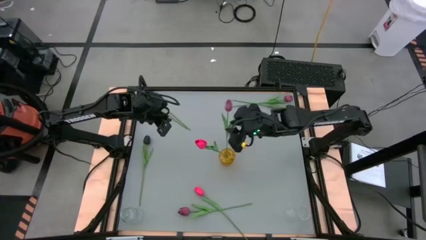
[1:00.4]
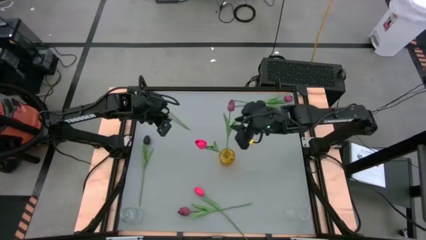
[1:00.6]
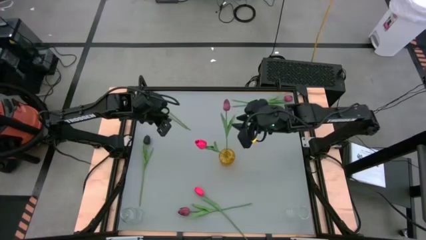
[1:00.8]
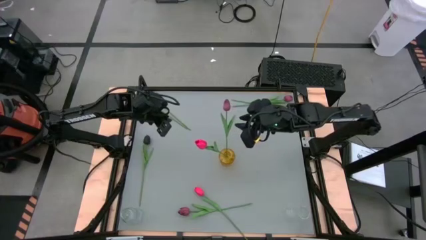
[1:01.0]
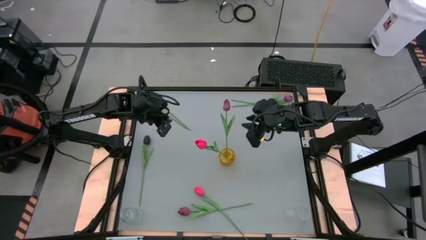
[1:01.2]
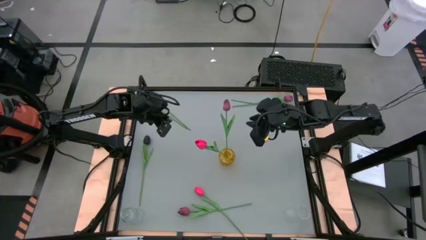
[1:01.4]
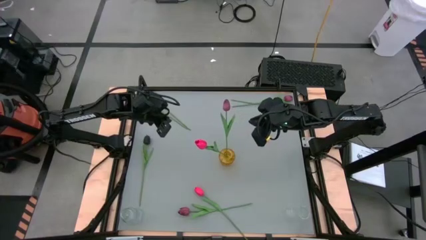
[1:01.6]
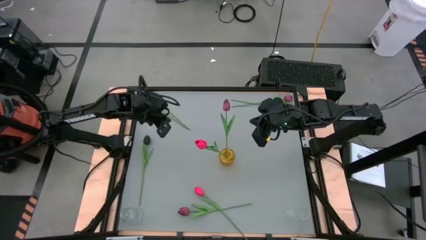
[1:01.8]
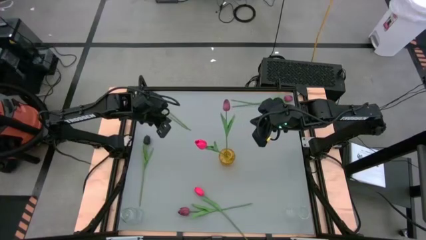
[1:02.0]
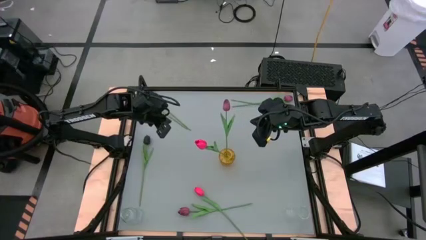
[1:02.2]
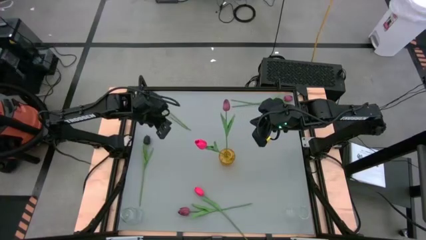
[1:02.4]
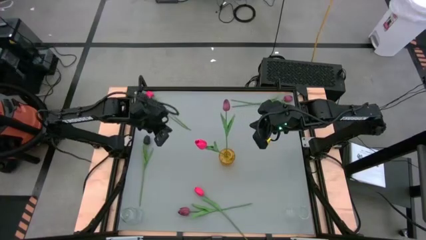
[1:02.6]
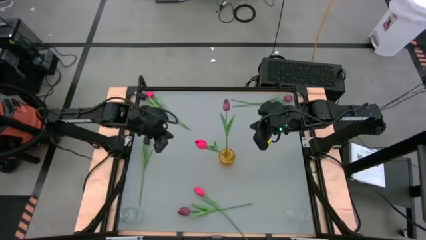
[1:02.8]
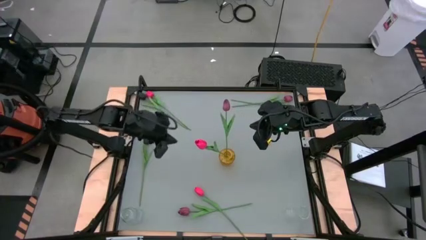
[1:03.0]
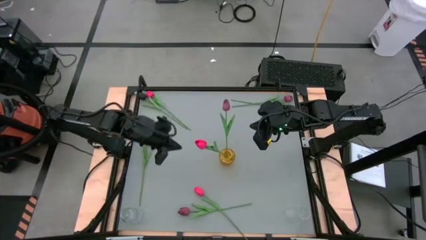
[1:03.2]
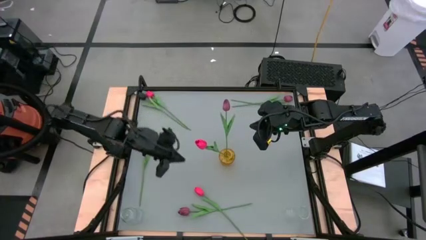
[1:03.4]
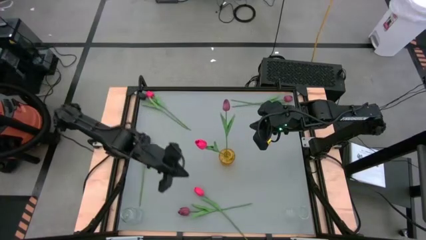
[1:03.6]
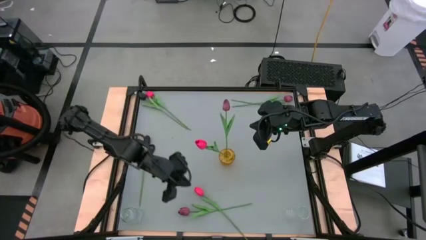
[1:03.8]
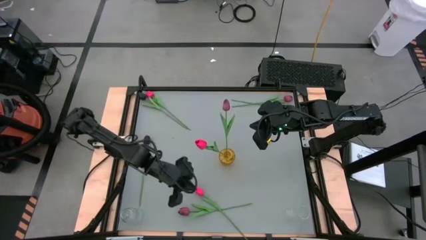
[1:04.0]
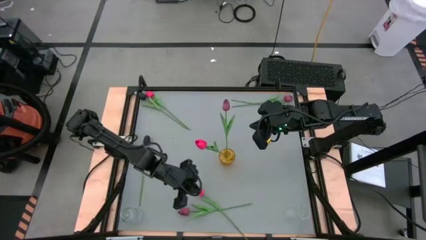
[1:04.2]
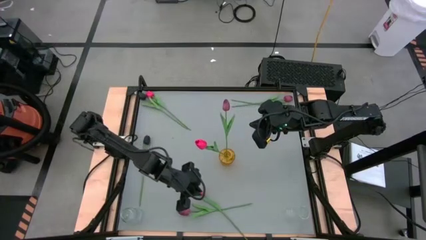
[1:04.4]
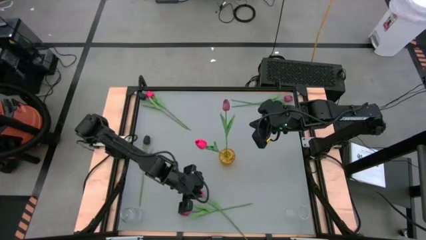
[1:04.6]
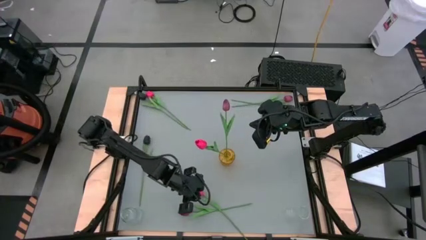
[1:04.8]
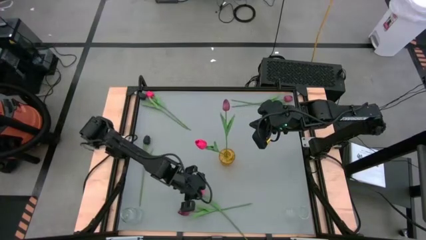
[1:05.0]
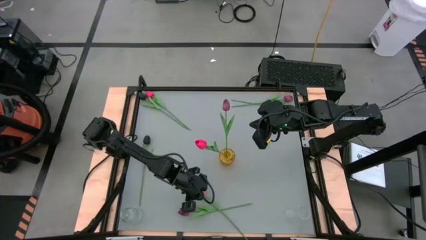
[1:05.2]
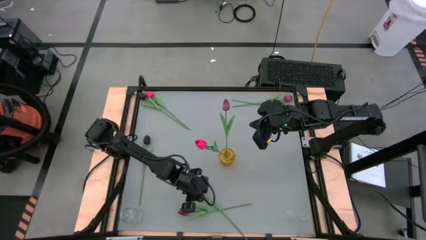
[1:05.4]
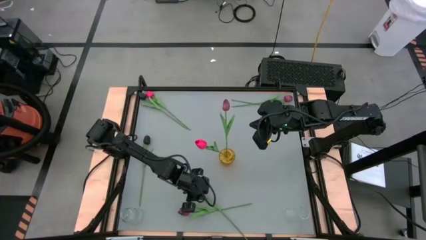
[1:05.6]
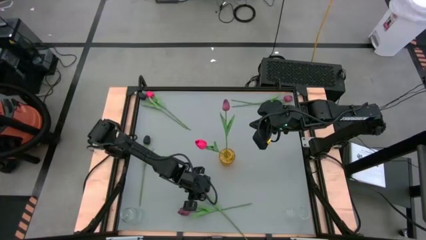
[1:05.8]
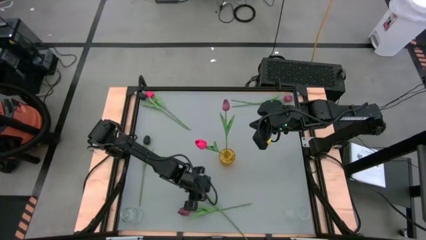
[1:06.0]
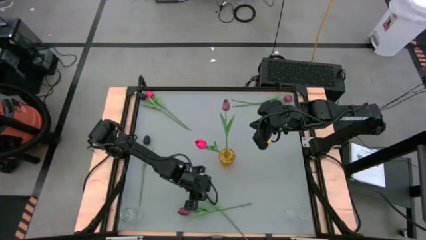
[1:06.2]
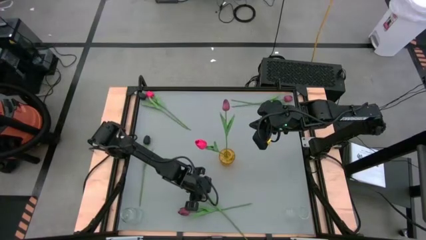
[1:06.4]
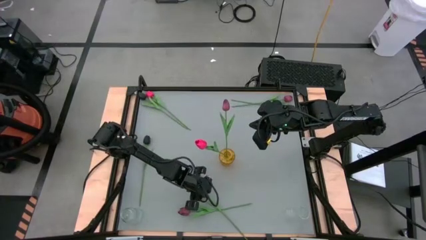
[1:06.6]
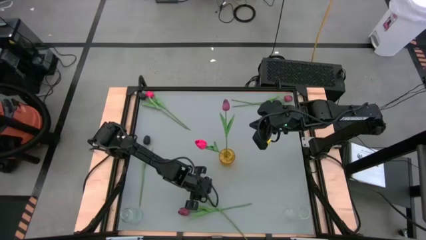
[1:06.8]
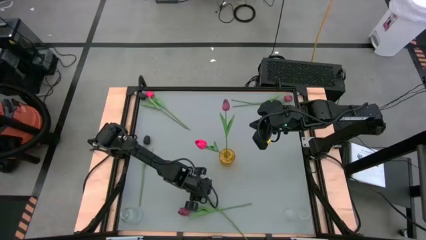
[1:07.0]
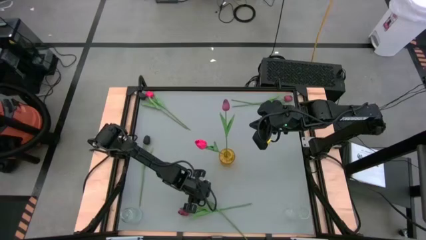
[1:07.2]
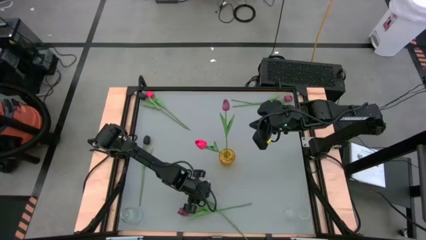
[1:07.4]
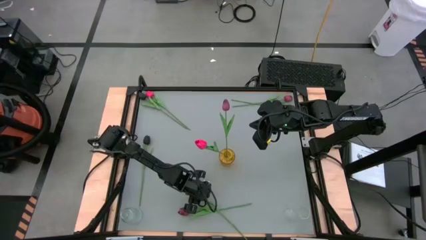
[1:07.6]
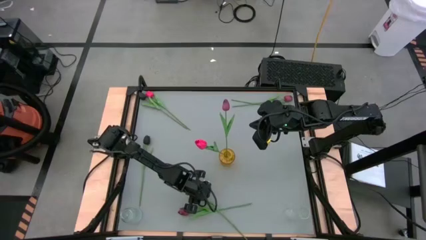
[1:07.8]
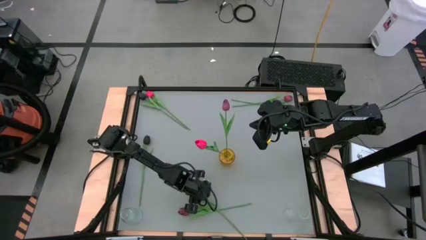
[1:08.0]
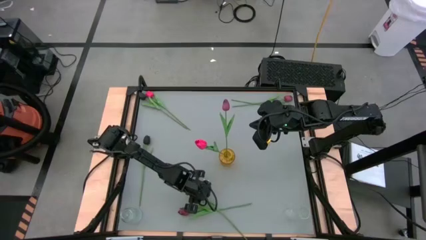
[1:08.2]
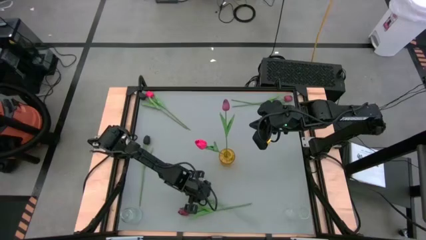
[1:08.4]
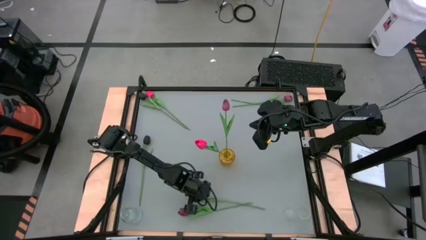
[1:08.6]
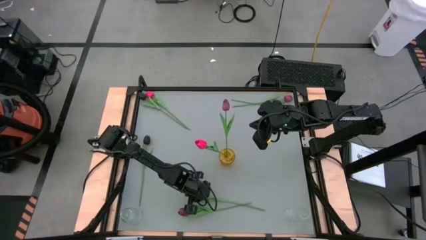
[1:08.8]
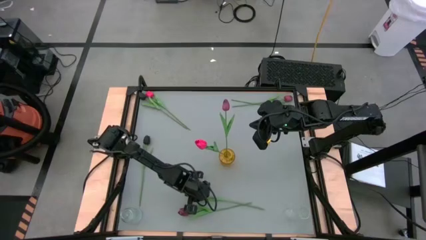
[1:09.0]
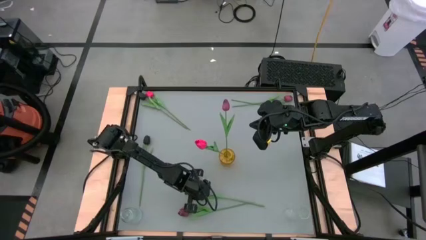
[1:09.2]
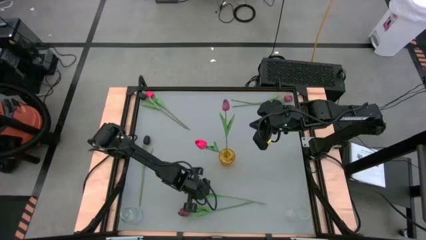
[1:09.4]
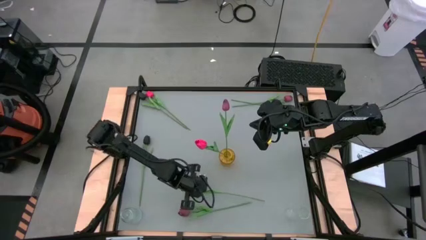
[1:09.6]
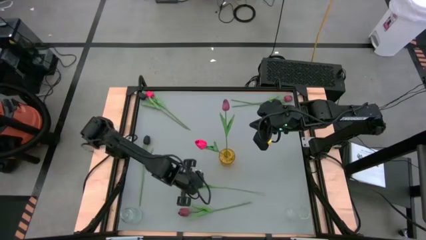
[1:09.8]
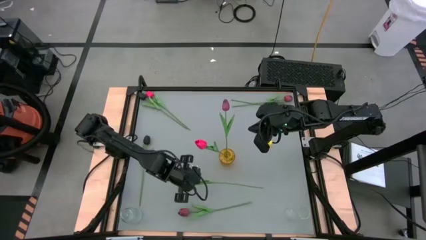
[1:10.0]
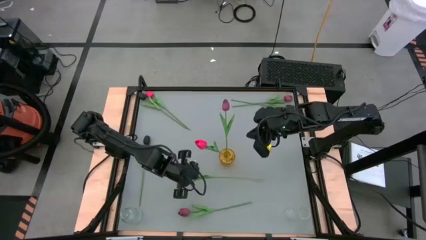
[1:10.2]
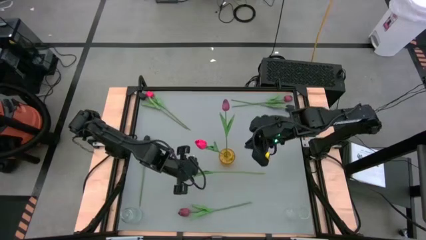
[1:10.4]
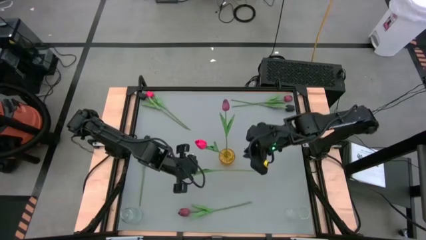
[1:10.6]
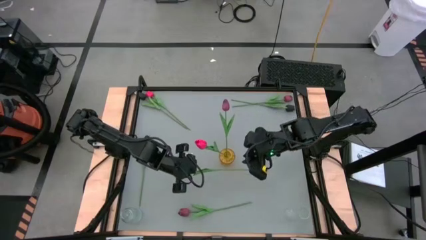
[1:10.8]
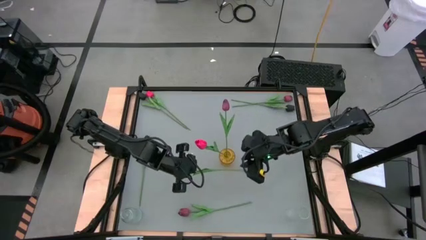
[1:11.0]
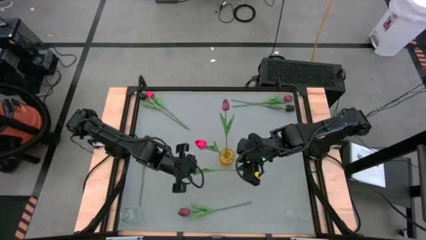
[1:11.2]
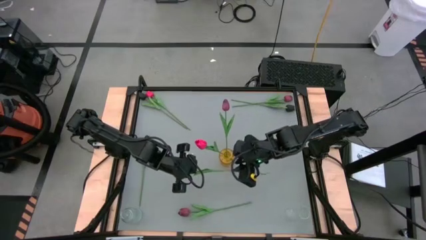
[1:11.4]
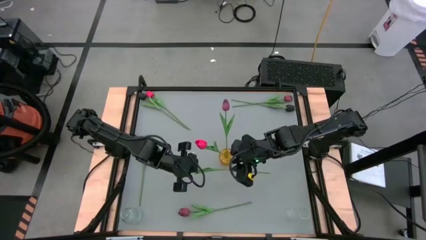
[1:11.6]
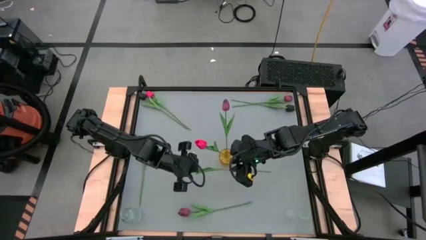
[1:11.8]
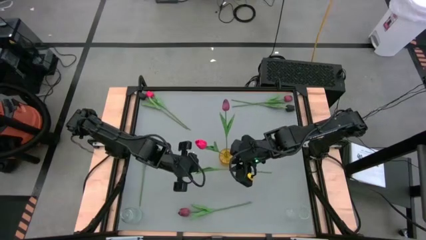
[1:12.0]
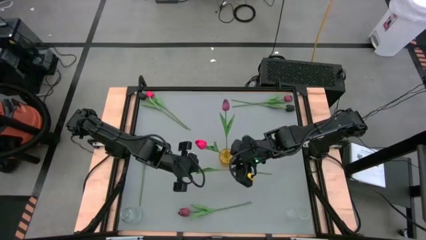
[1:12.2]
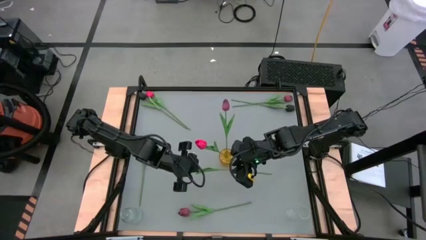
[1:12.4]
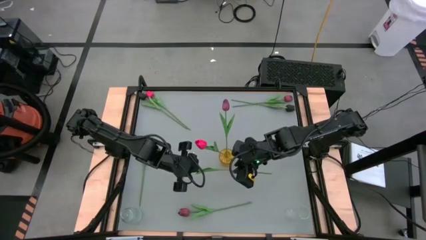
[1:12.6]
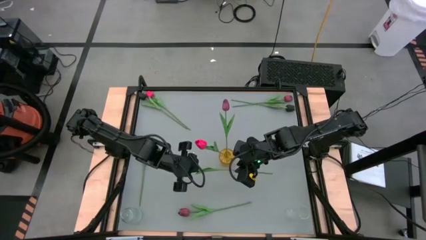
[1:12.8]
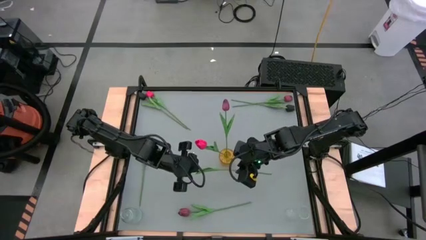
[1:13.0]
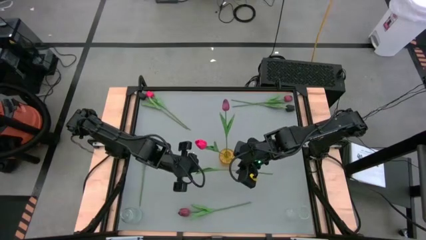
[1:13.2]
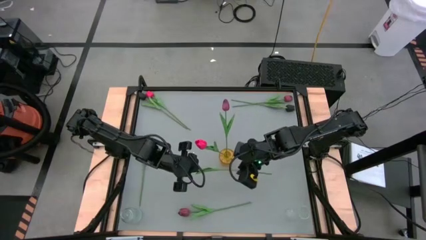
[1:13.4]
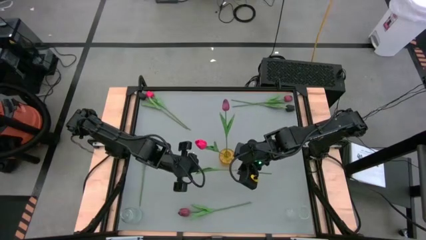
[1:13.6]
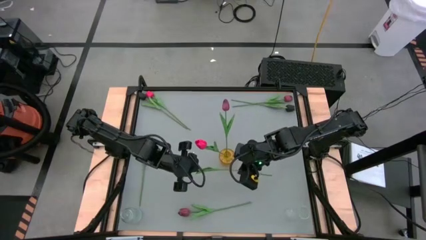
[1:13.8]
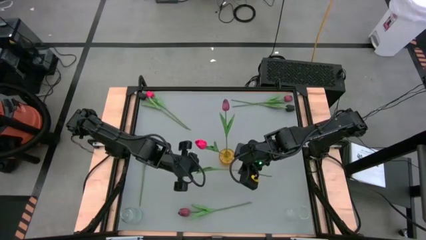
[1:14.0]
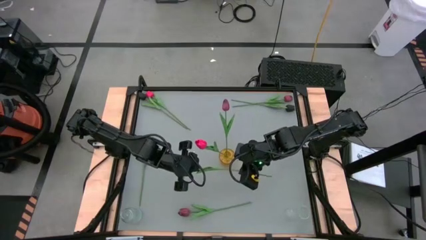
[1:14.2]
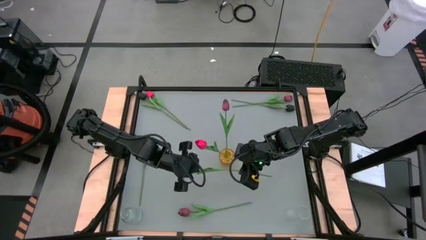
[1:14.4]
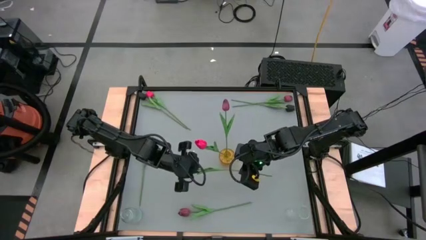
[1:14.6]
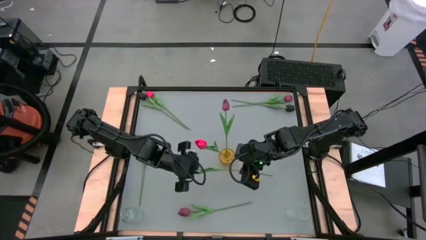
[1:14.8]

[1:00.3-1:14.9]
Task: Sort flowers into vase by color
Put the bottom pink flower into the yellow vase
